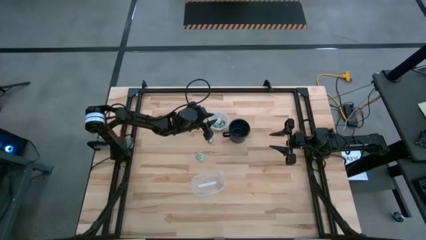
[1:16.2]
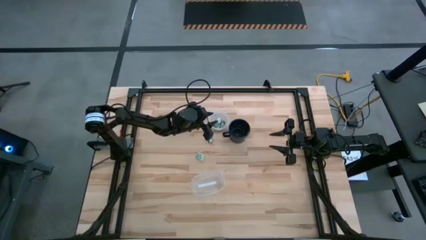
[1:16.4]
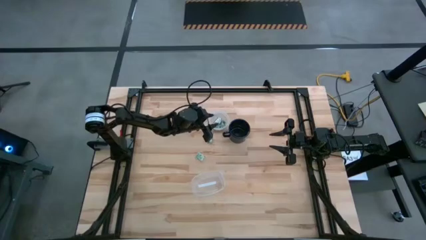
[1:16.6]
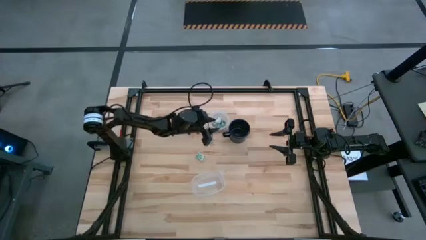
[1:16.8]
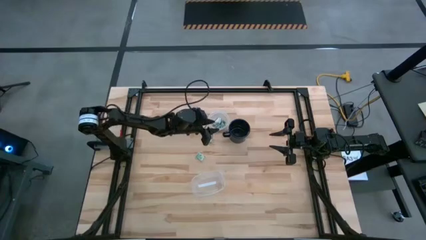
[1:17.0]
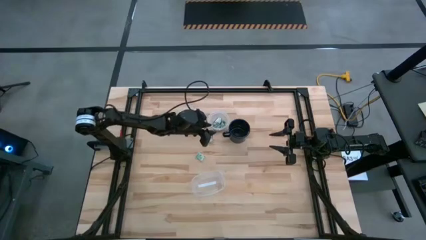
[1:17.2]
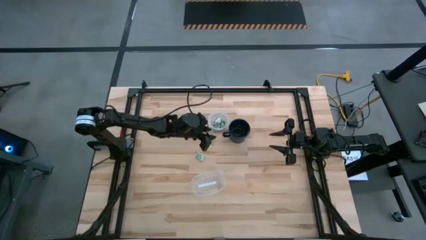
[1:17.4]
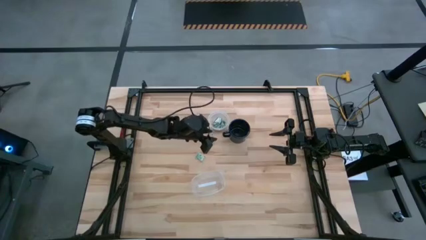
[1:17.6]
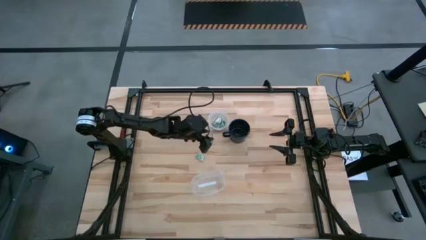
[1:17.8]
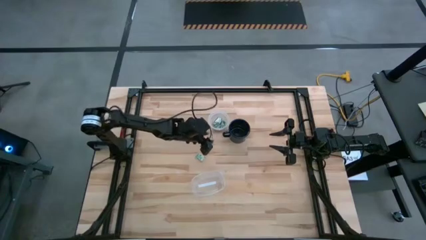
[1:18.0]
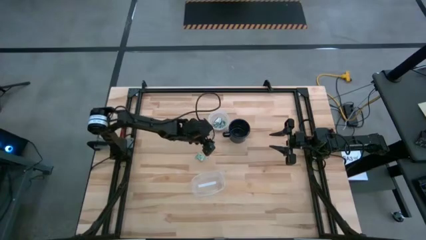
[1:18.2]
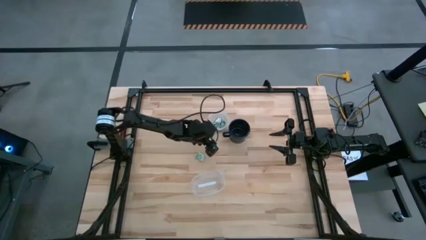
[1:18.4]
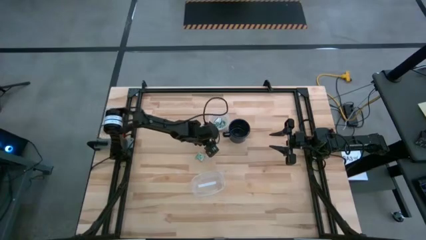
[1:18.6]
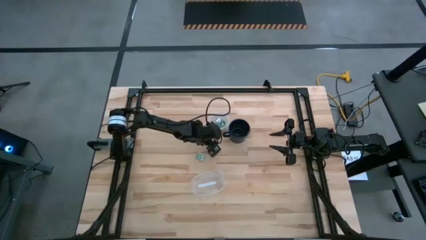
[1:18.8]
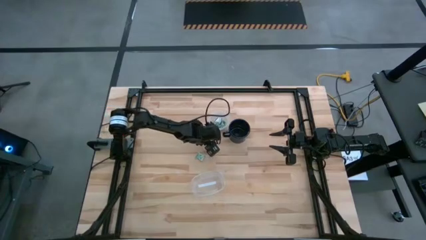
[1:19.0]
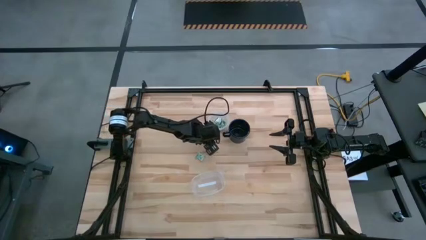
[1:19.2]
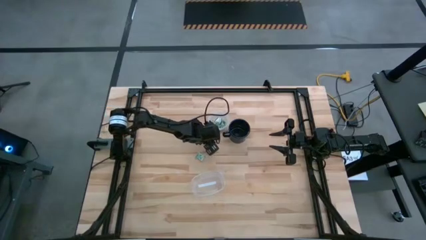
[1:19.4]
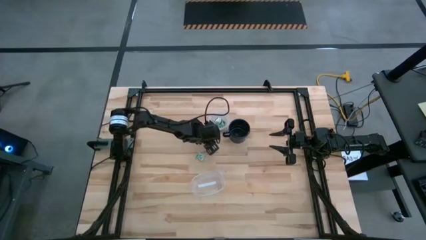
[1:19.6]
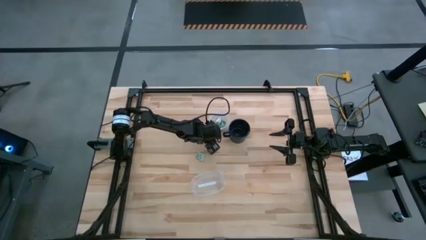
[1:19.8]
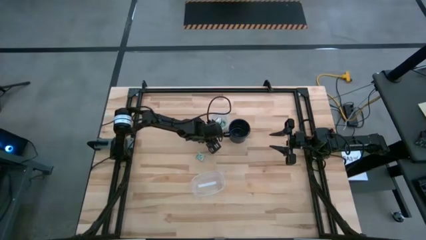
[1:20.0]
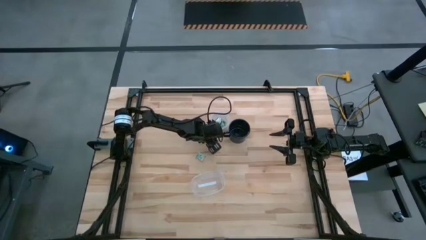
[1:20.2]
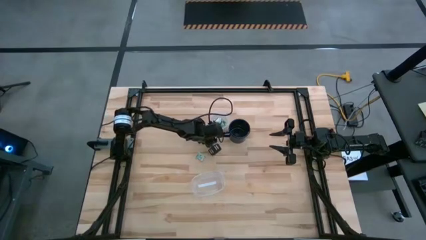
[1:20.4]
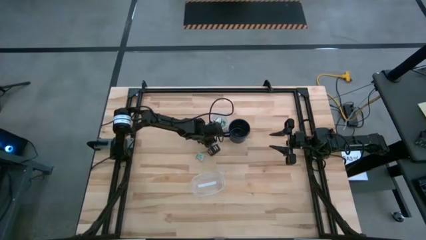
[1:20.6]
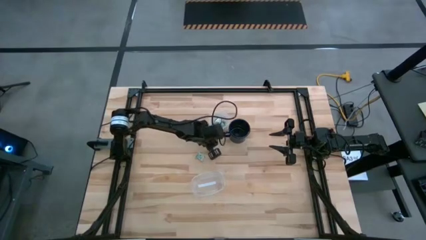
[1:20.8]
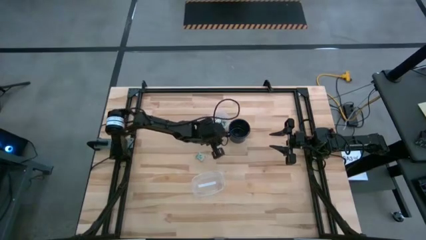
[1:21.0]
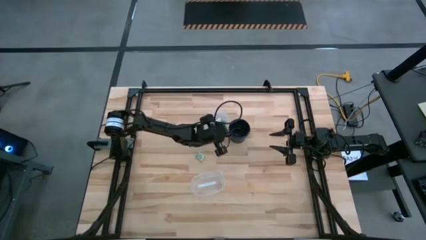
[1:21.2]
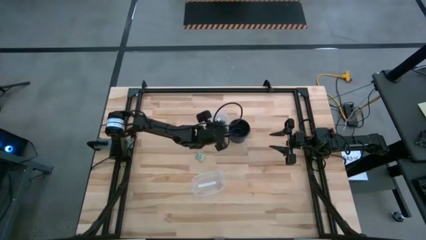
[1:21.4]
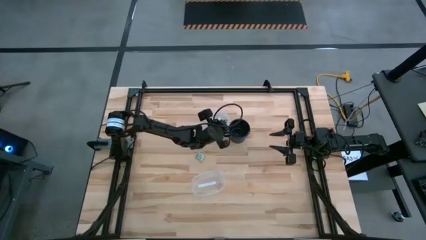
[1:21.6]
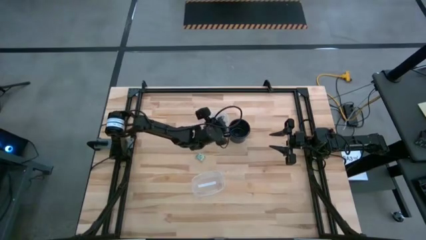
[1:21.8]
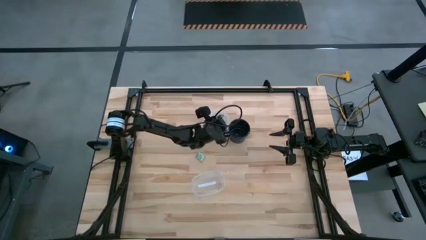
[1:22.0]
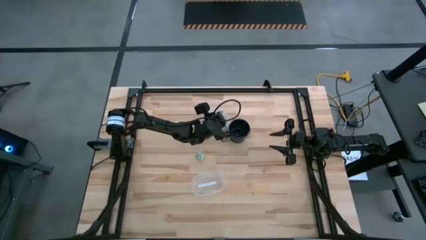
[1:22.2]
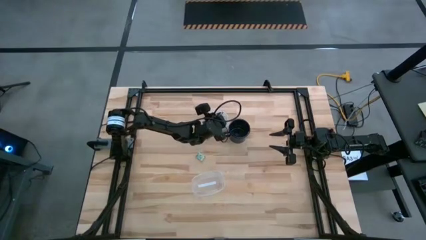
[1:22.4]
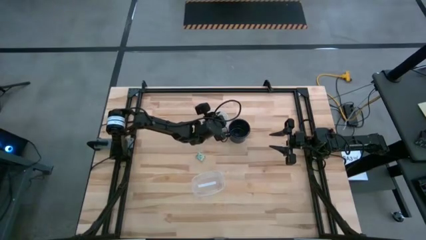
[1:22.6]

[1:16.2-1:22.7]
Task: Pick and place Stevia / Truvia into bins
Put the truvia packet into the top transparent container

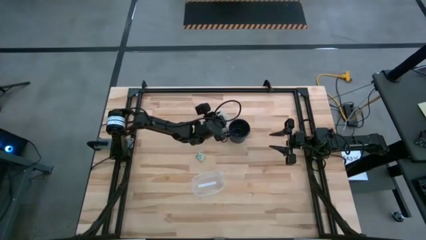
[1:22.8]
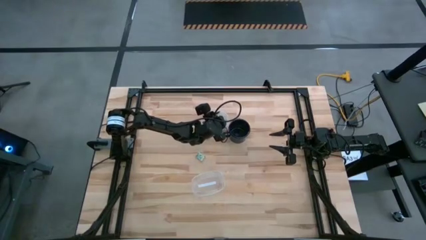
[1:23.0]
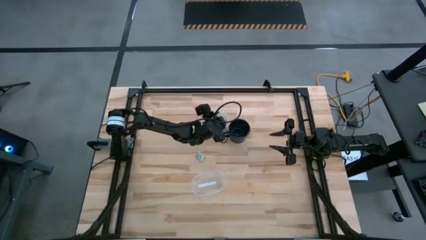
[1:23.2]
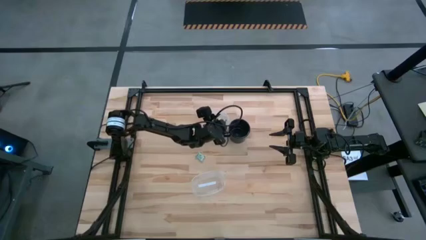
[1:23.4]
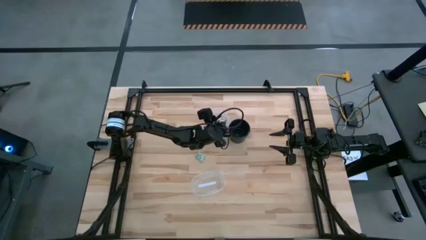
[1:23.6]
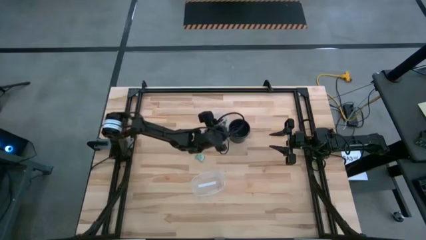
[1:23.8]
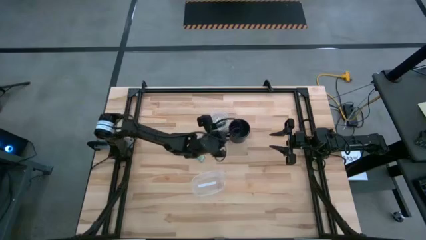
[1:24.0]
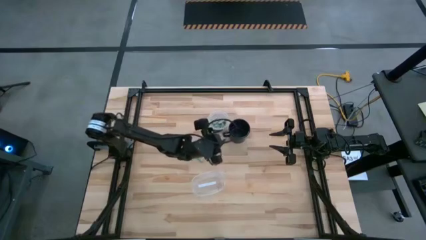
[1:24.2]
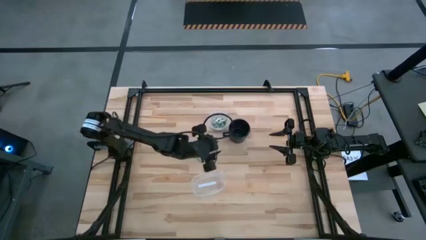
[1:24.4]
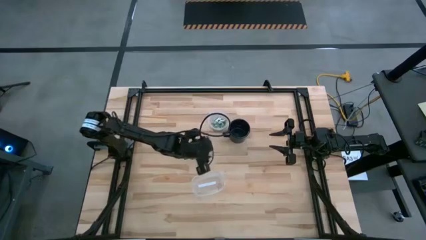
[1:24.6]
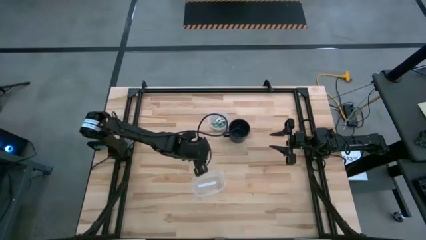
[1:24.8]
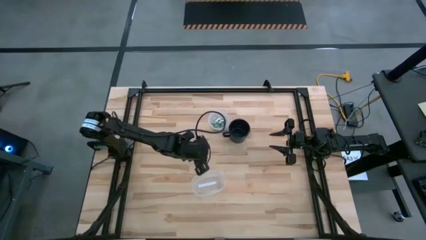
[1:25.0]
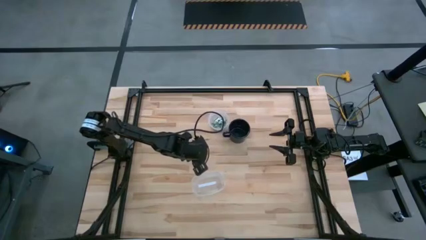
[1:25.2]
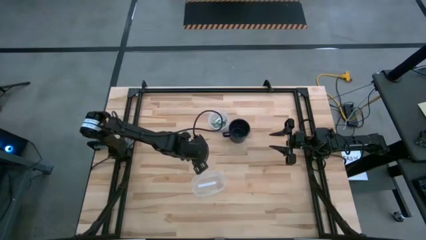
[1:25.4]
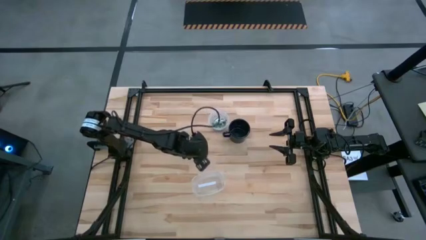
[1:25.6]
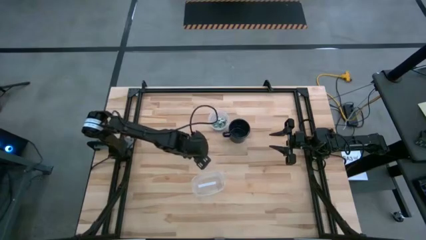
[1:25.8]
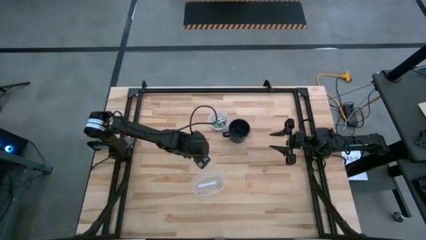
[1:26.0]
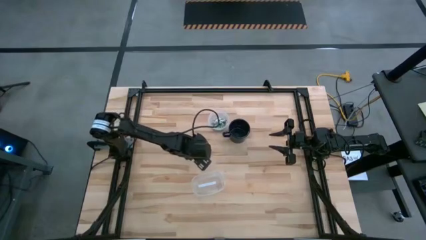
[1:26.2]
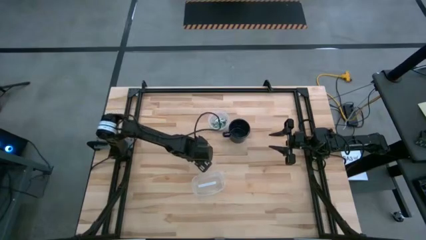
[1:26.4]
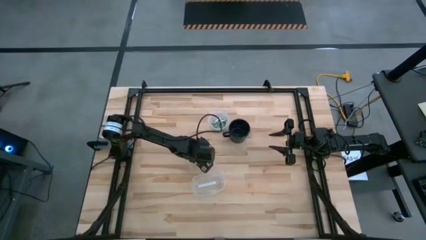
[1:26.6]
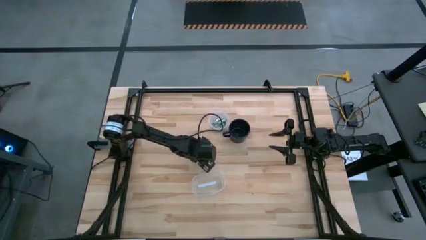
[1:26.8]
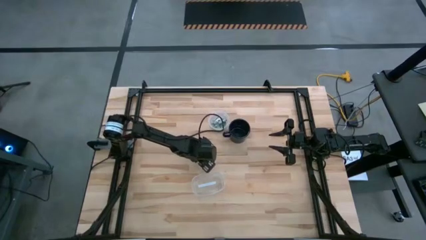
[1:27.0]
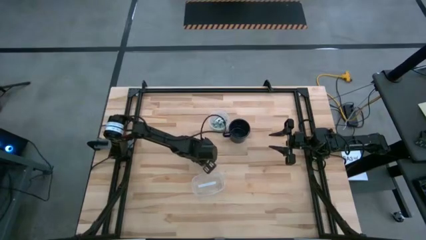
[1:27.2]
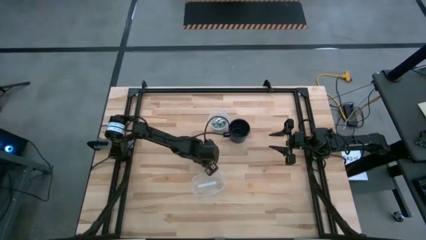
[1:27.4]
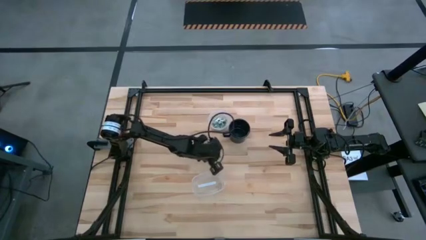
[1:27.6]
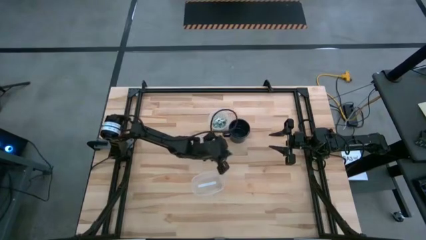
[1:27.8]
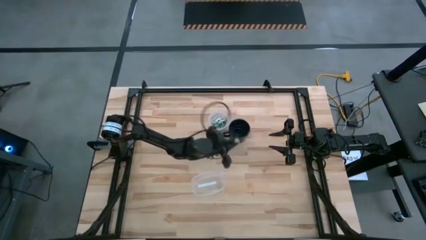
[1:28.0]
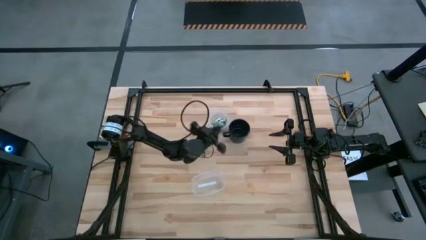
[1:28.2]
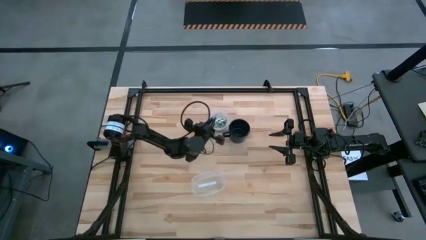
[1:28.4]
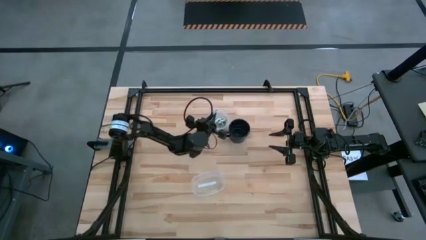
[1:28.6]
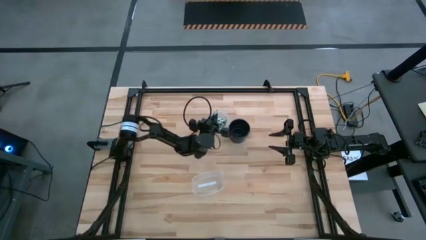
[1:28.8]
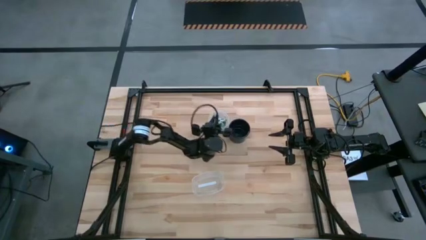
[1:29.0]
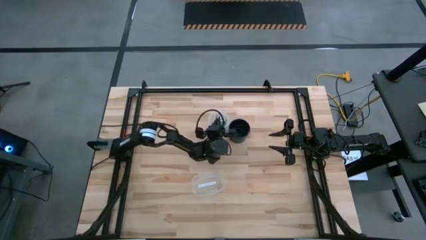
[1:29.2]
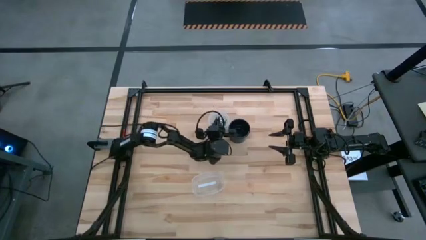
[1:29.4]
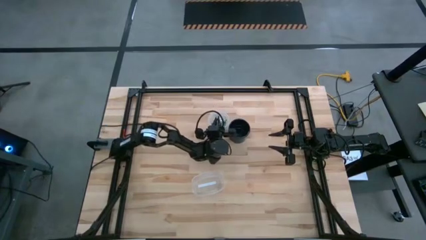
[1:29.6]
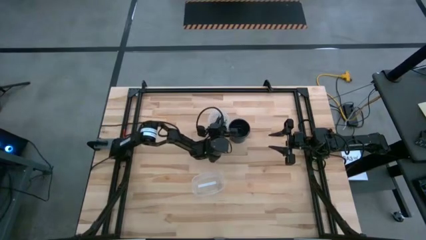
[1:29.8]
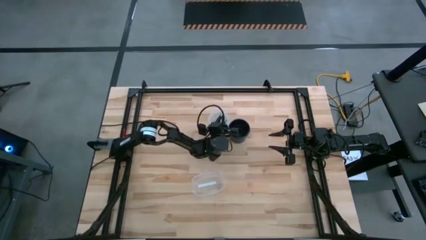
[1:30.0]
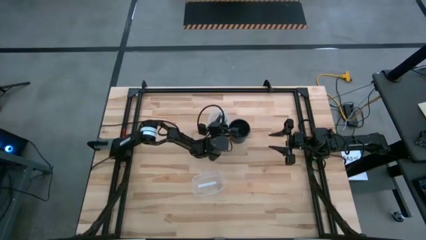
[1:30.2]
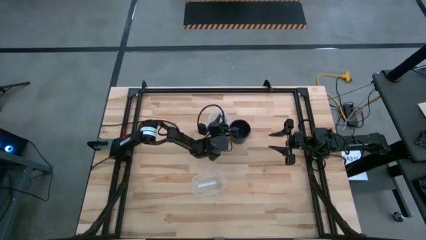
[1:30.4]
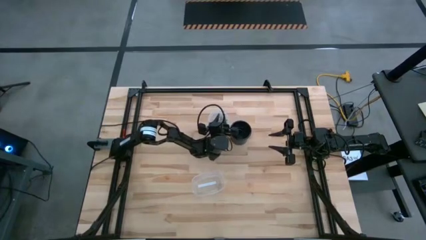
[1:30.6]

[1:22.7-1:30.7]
Put the stevia packet into the top transparent container

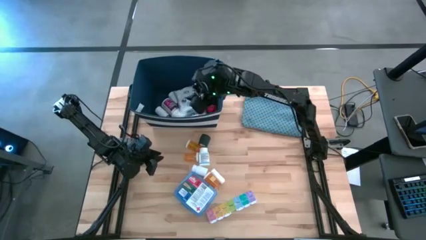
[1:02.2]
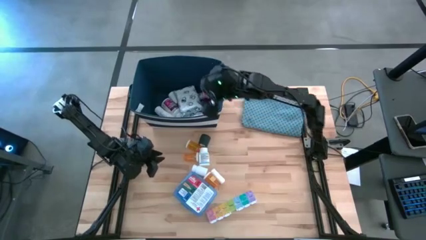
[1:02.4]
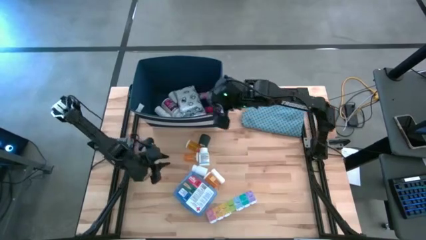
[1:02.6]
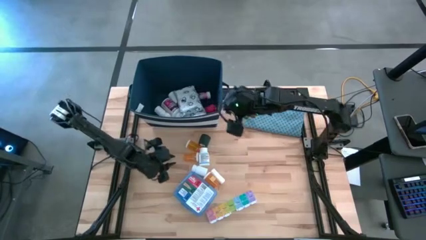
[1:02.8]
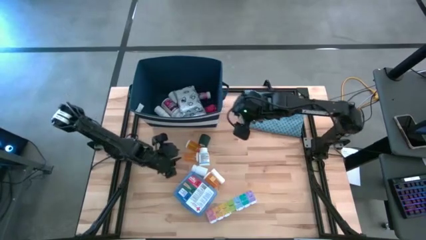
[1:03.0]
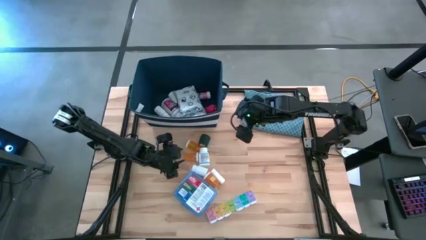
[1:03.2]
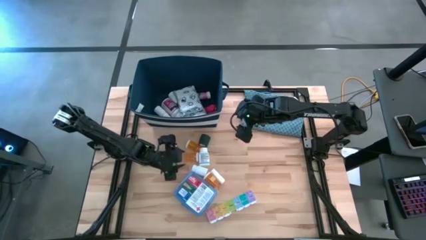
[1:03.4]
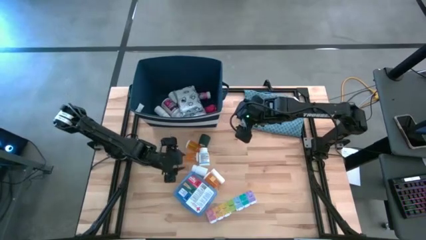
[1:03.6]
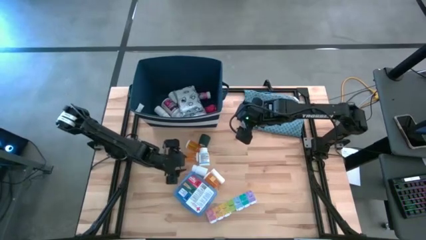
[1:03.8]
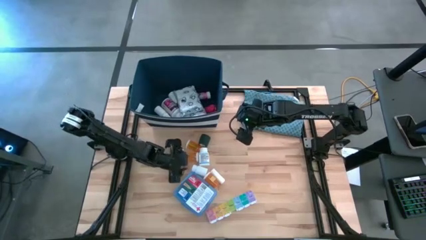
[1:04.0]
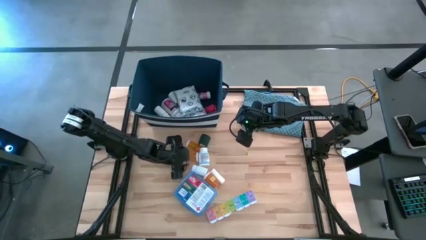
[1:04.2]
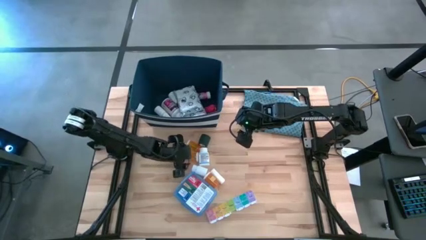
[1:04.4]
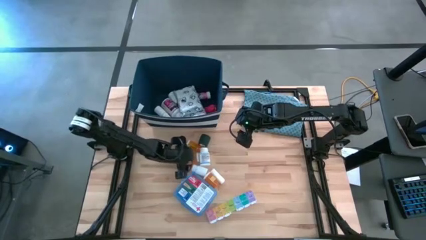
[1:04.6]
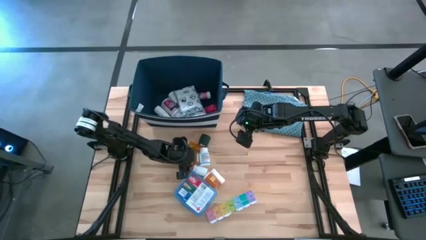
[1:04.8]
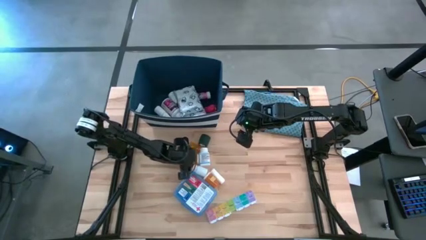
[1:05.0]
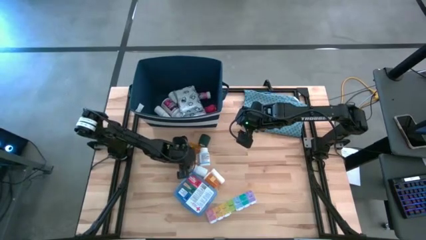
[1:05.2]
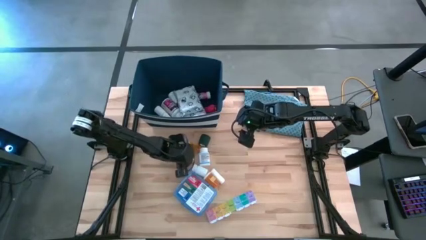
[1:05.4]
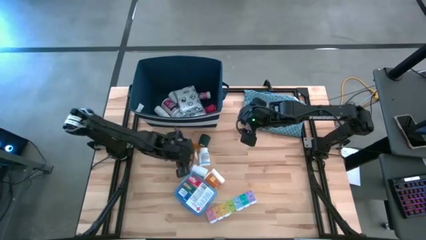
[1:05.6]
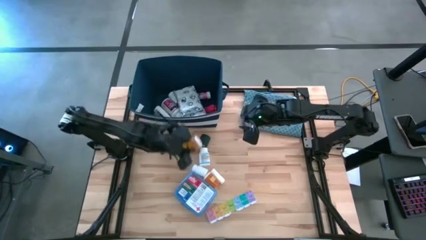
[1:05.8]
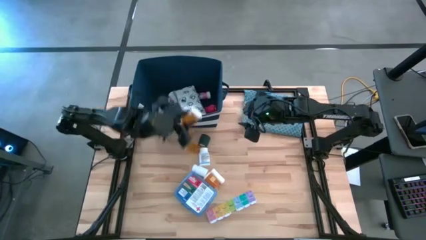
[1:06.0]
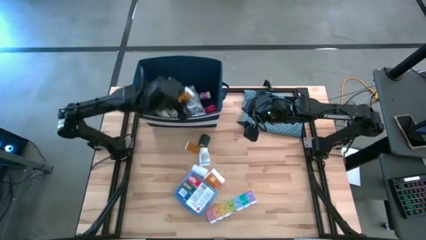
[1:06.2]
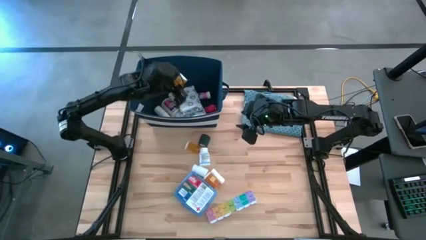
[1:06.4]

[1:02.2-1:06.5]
Task: Pick & place medical supplies in basket/bin
Put the orange pill bottle into the blue bin
